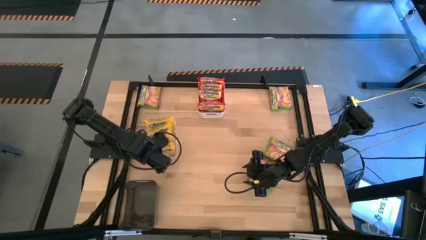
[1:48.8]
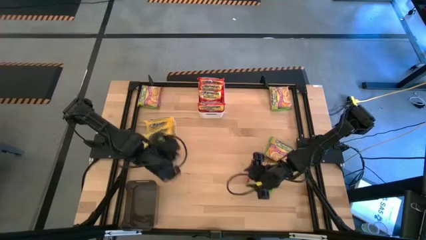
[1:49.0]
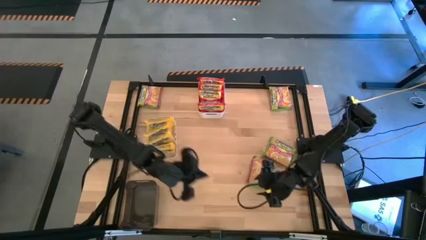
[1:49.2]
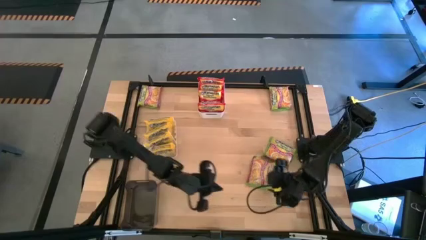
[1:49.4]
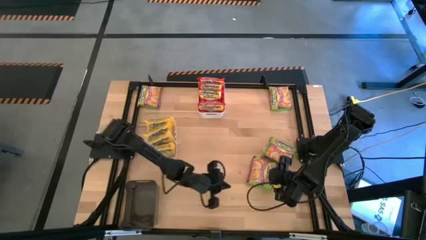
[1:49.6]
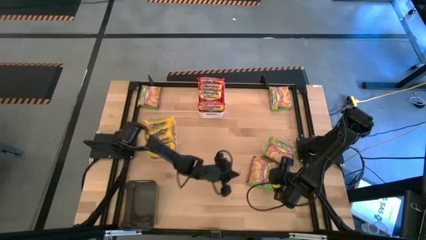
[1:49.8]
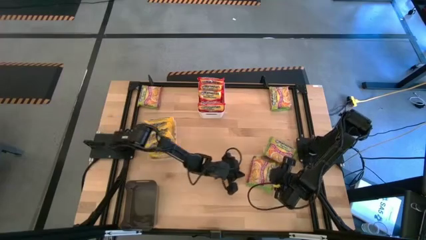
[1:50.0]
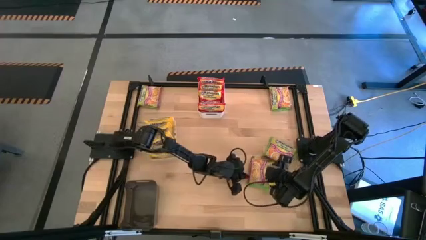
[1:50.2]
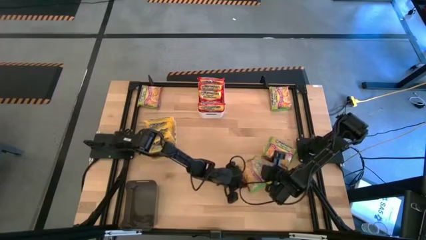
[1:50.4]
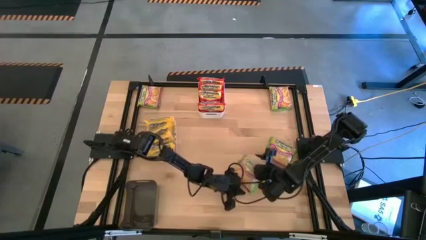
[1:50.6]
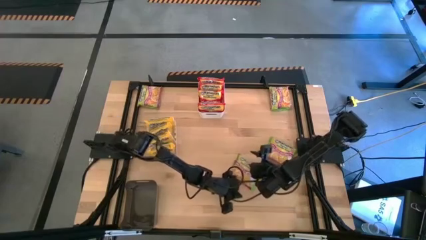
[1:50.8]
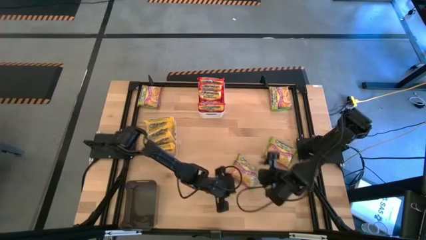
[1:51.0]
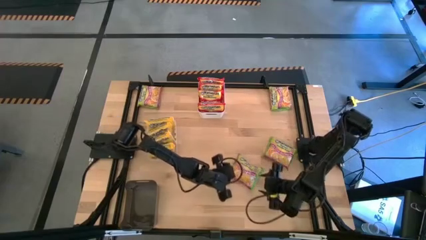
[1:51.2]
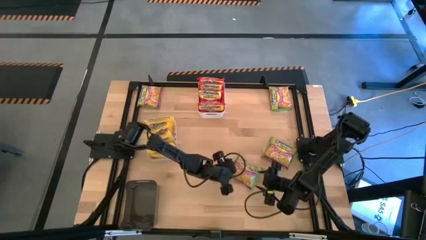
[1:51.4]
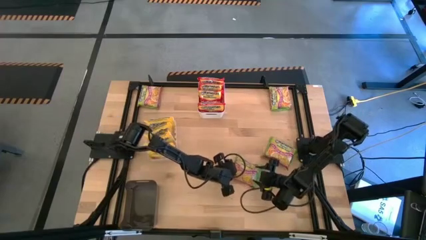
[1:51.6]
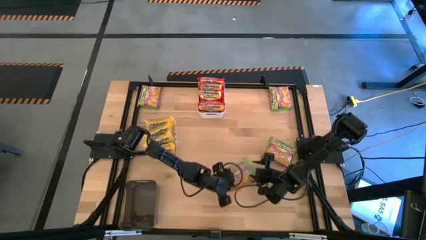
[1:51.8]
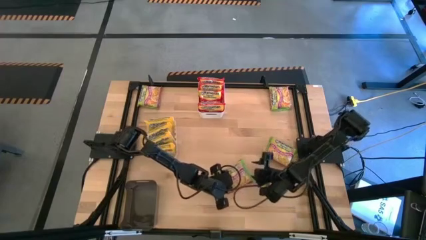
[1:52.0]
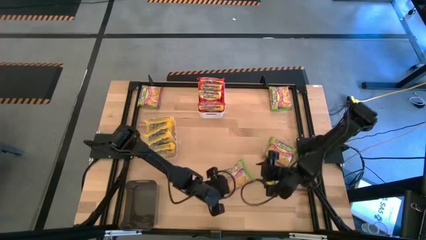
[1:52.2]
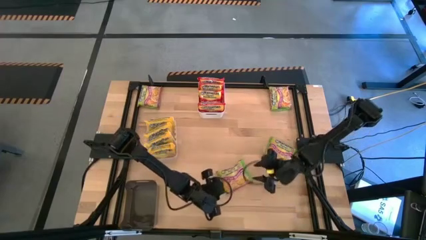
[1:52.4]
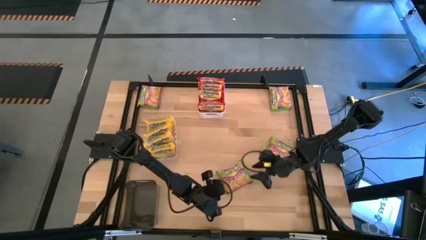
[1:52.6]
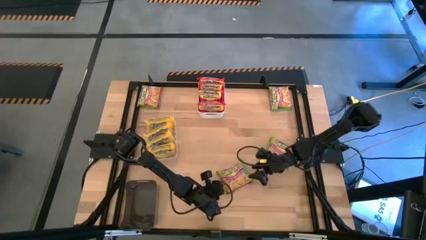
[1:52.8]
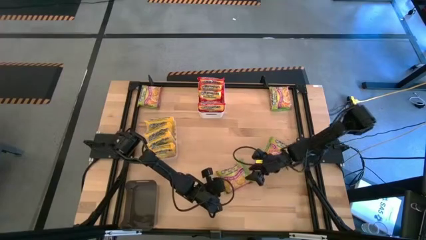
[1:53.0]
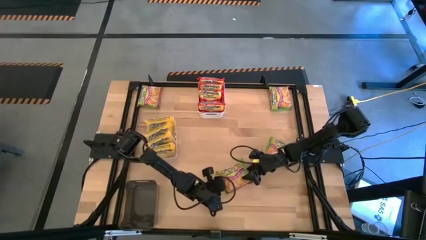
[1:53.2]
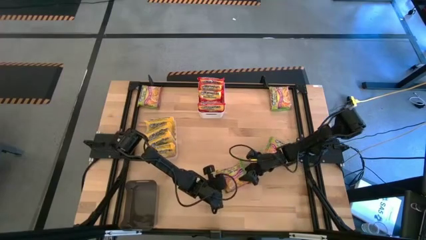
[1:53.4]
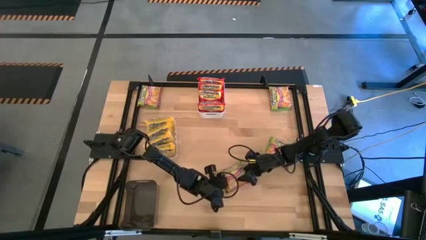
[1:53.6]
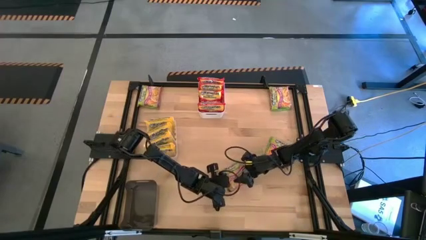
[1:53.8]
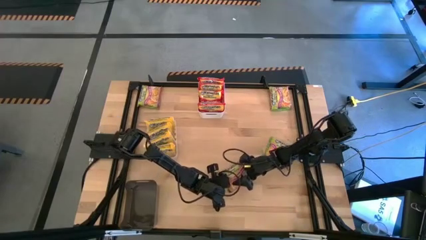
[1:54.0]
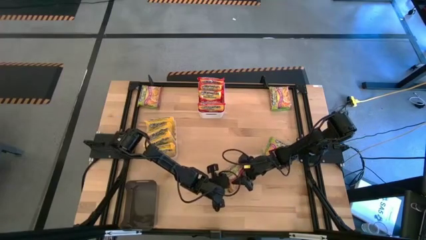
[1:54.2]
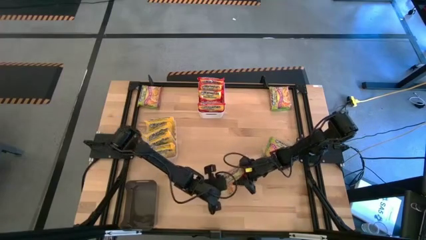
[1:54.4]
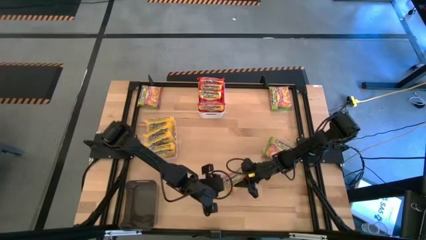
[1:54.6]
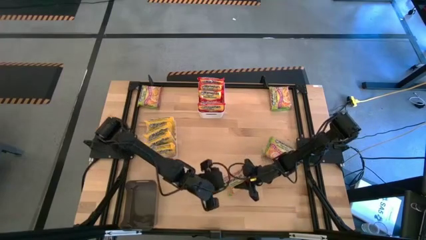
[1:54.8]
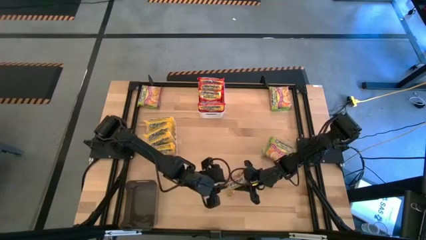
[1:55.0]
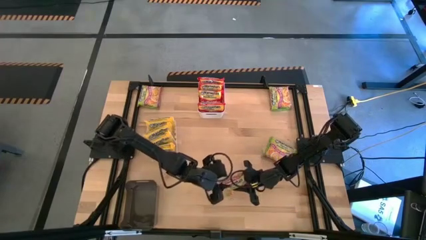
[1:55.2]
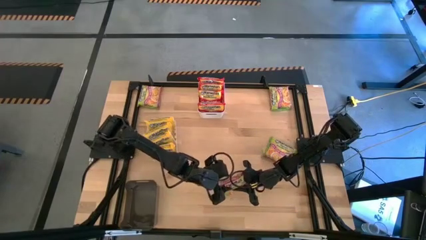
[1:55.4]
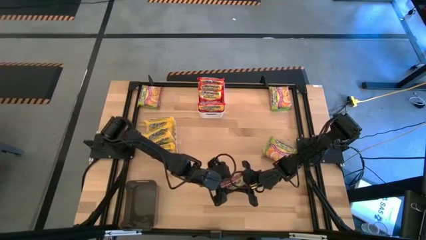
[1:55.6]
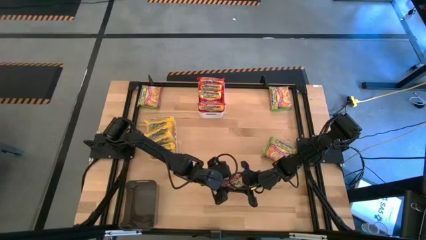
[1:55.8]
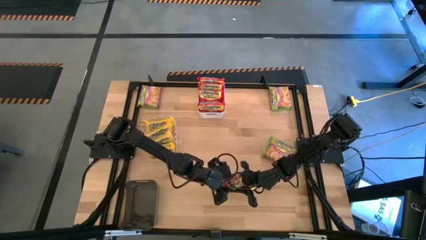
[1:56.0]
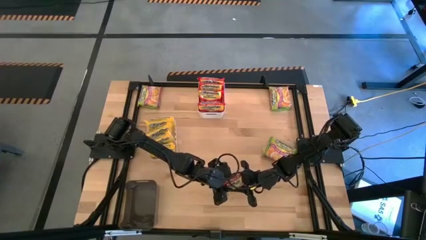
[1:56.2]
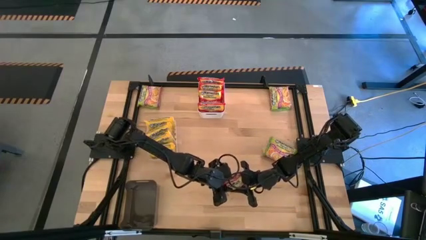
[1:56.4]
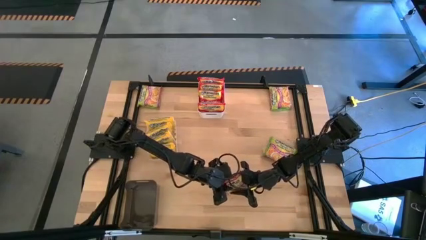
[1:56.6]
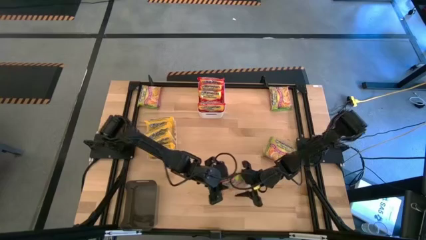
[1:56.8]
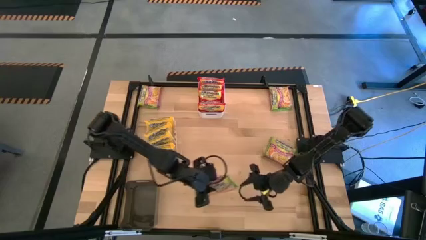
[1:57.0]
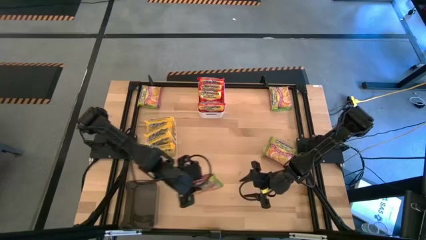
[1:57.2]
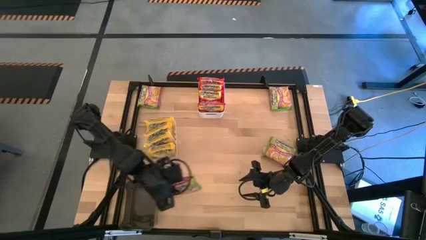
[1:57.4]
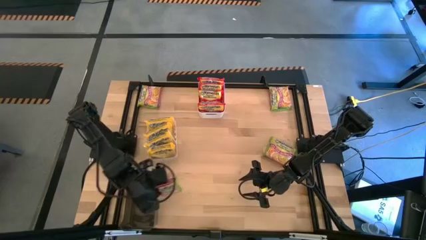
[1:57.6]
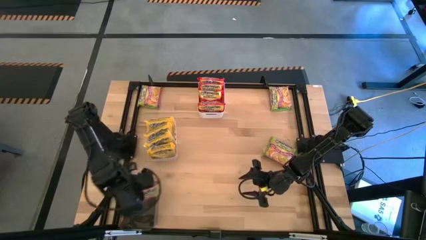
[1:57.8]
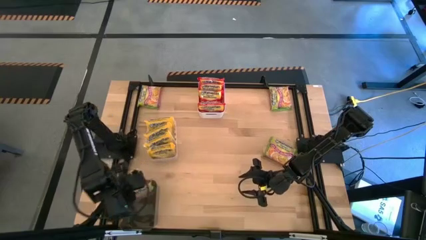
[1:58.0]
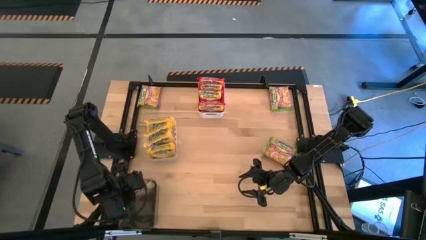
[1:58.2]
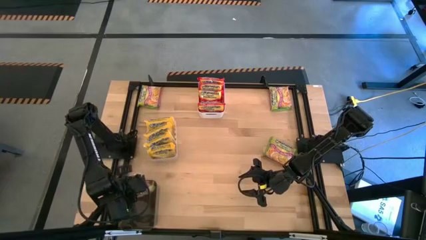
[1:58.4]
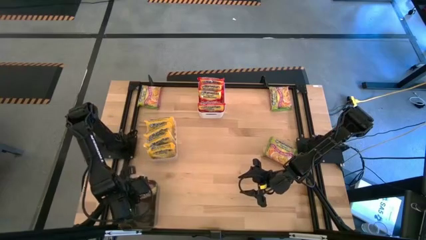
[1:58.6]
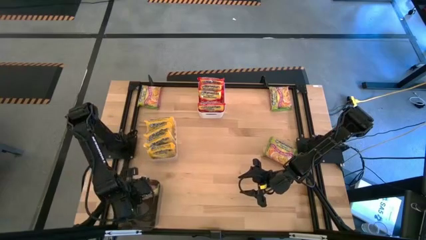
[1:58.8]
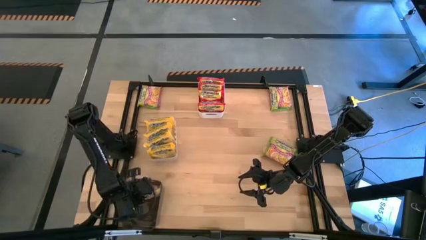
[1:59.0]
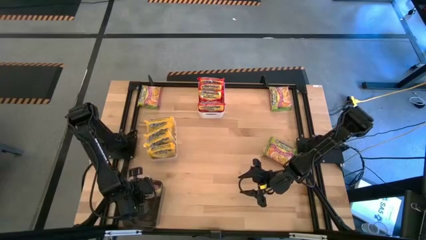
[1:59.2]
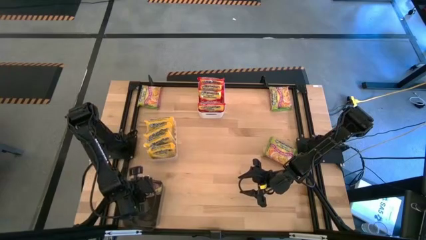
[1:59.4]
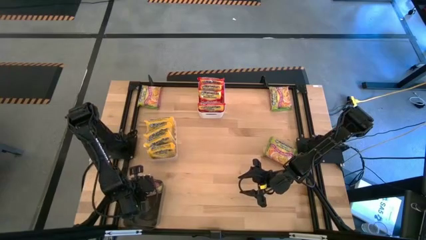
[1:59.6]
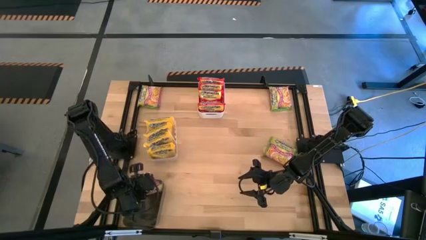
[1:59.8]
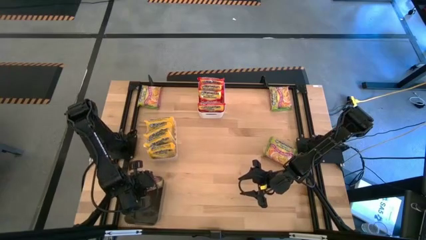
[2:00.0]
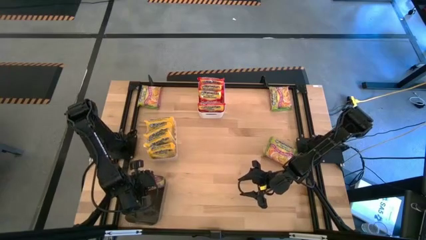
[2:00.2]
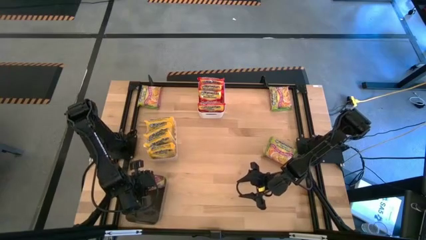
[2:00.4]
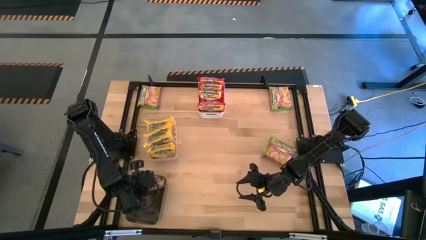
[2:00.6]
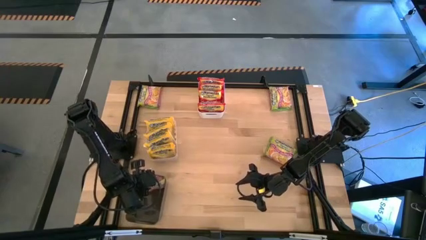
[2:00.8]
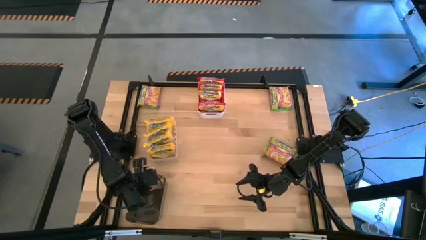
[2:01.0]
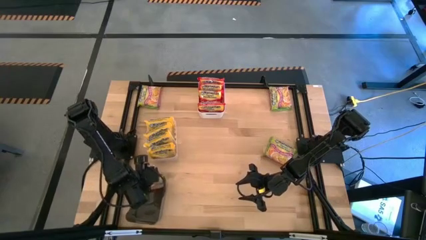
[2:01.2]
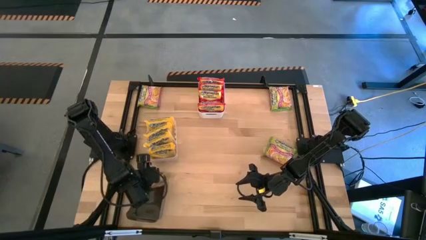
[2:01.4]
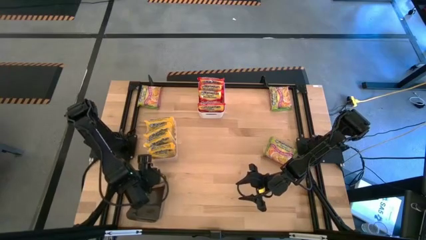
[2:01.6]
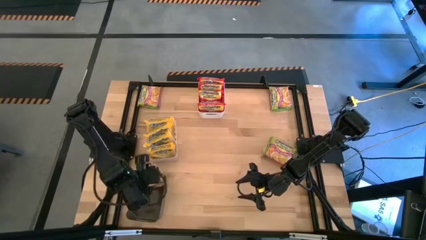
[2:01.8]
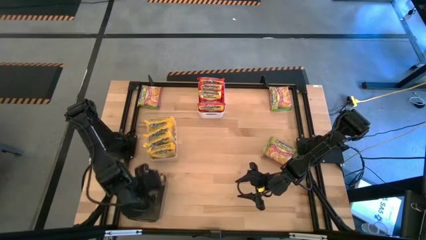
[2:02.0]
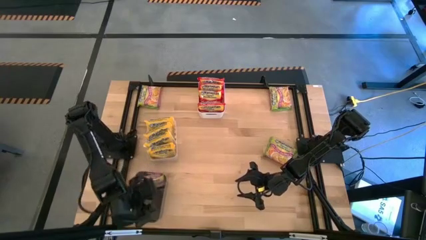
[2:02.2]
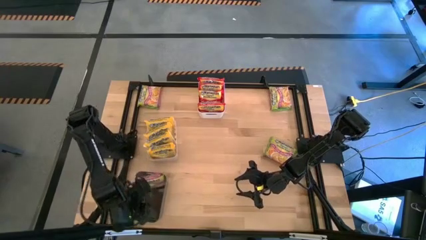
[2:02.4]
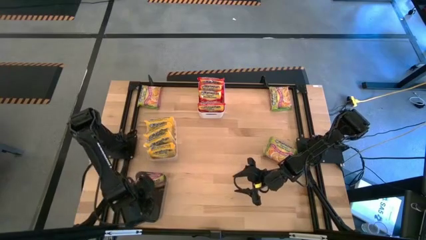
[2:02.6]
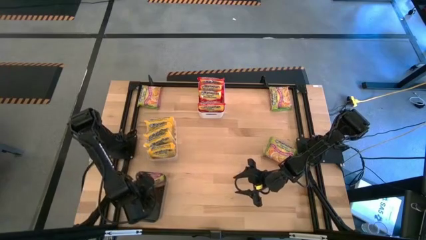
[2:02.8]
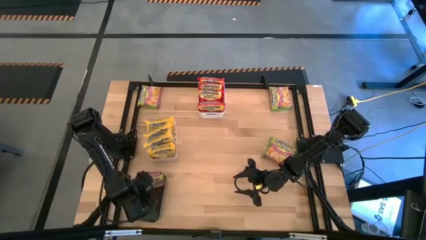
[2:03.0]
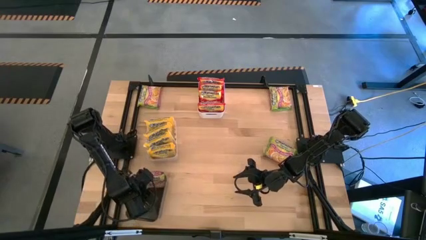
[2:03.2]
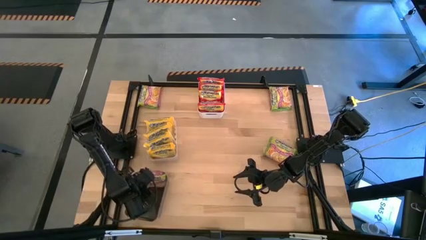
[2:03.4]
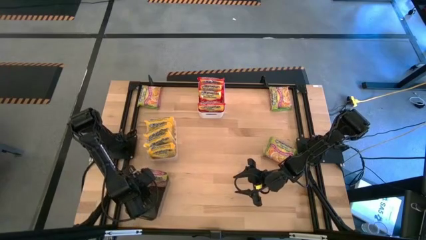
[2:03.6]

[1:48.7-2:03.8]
Task: Sort Maruchan noodles
Put the green noodle pack into the black bin

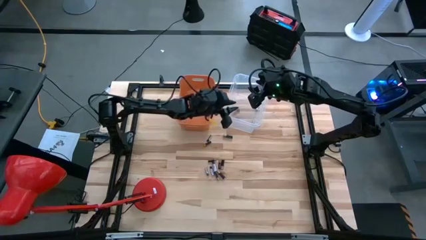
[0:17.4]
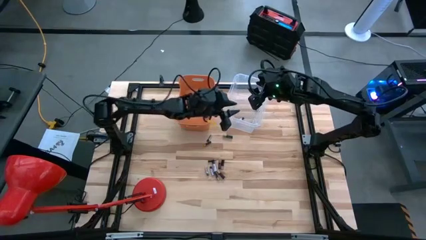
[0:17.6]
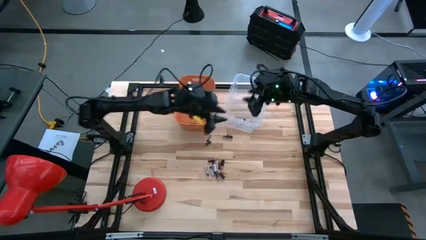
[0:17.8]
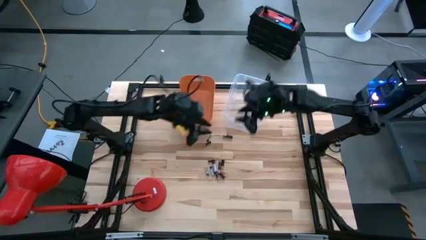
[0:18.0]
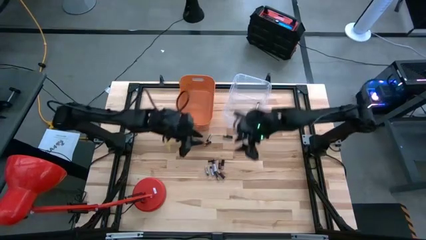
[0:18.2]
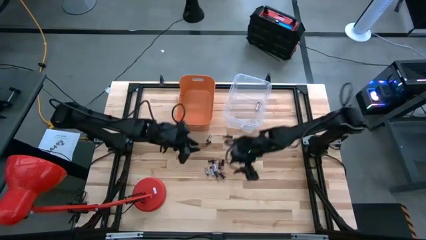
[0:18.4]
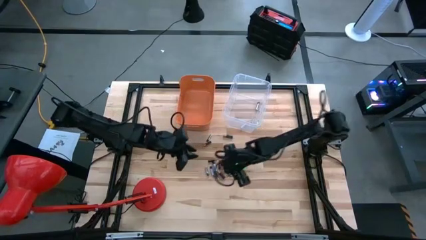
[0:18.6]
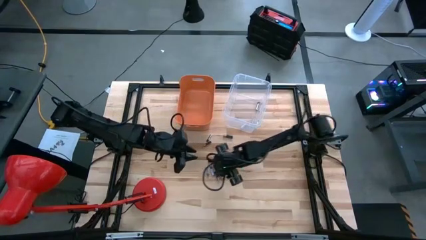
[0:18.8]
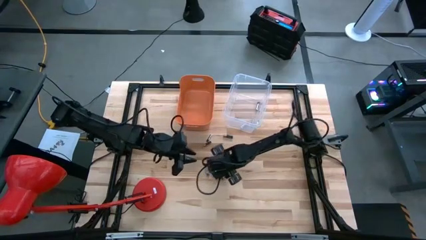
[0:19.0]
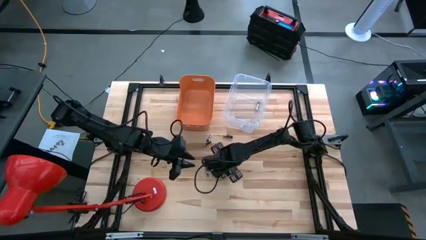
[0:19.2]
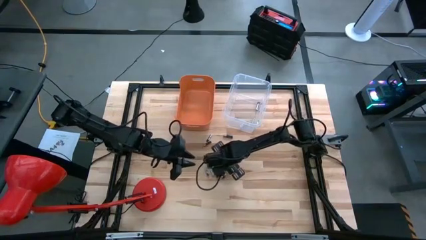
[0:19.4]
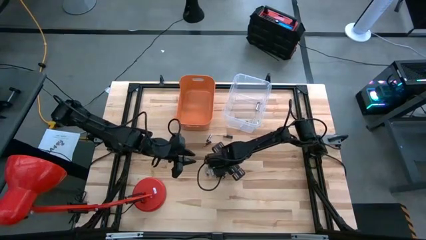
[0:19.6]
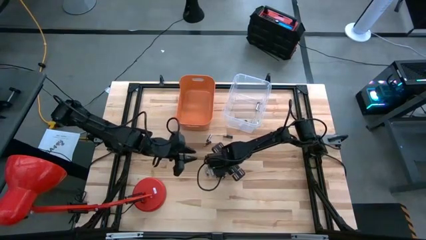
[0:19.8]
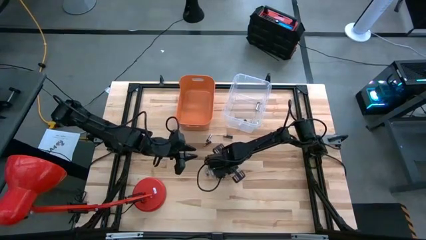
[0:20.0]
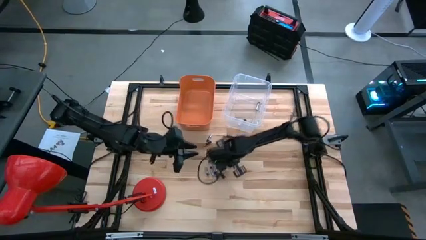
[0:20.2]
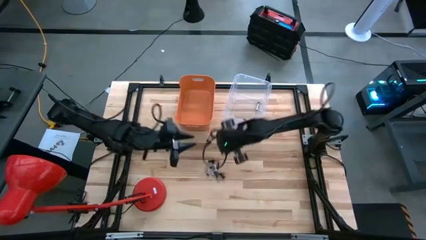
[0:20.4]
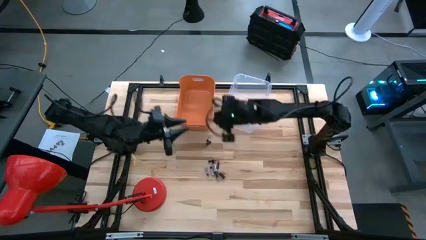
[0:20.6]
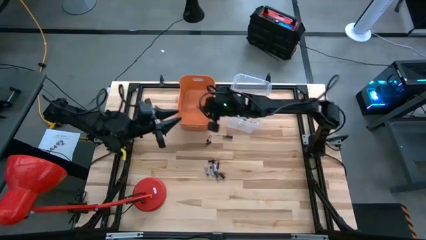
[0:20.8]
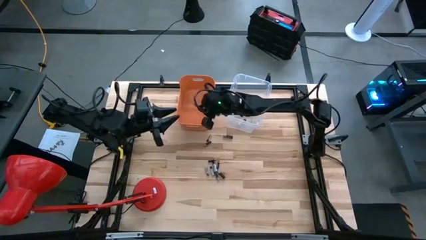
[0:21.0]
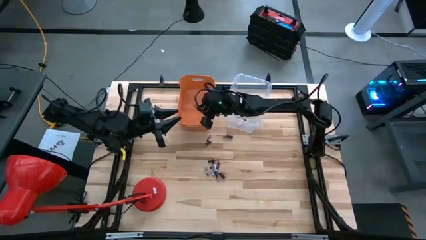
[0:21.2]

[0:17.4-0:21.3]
Task: Sort batteries
Put the brown battery into the orange bin
